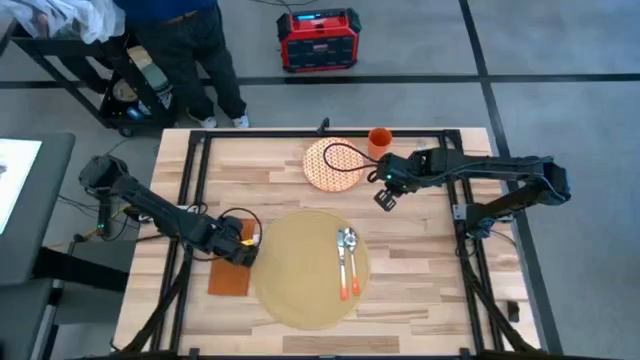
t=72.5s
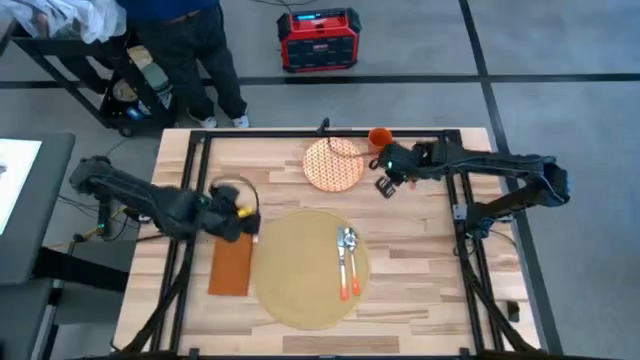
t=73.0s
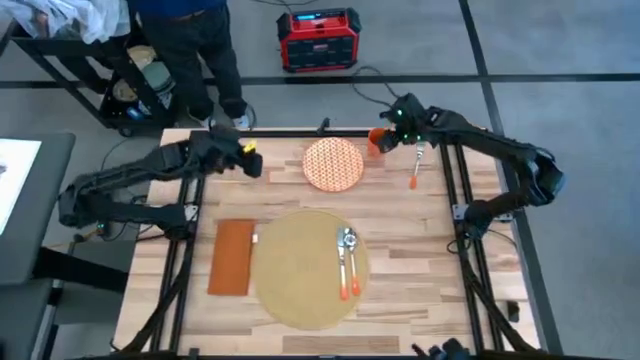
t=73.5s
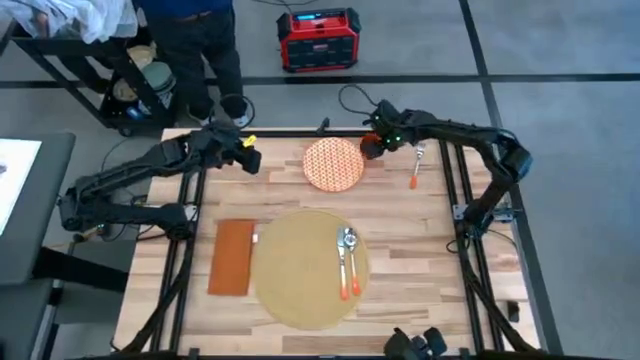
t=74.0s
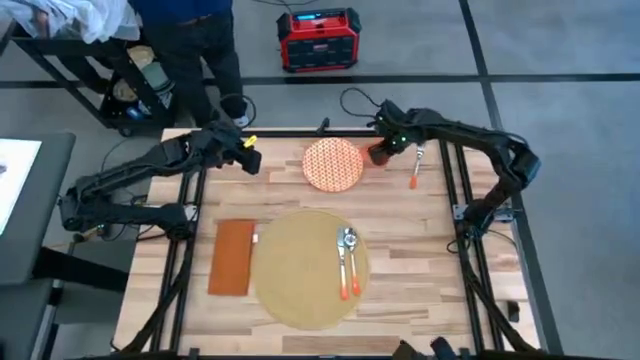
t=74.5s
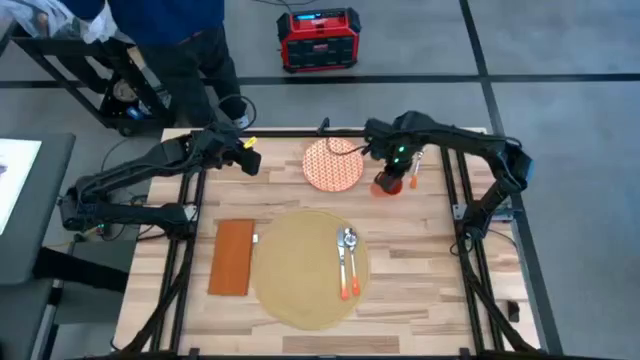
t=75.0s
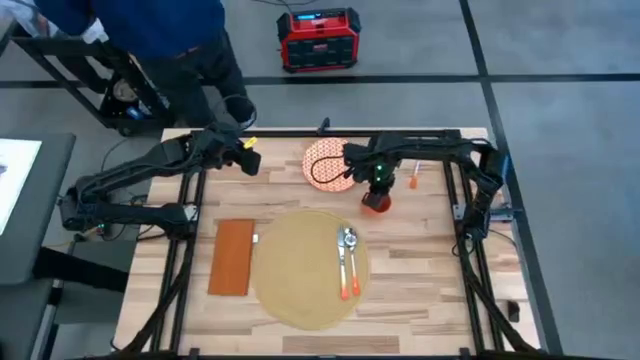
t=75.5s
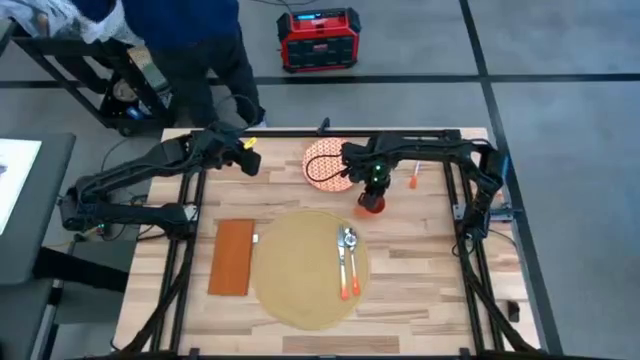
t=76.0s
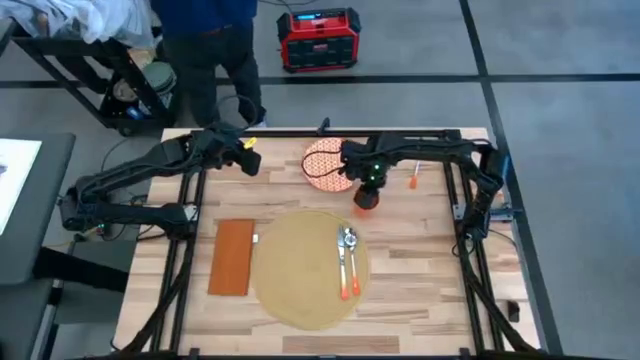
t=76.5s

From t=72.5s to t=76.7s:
Task: Set table place
Move the orange cup to the top of the brown placemat

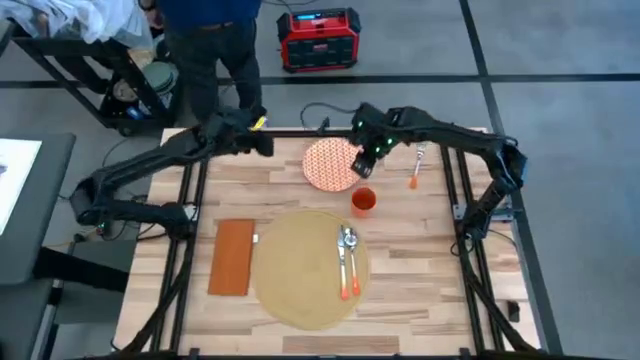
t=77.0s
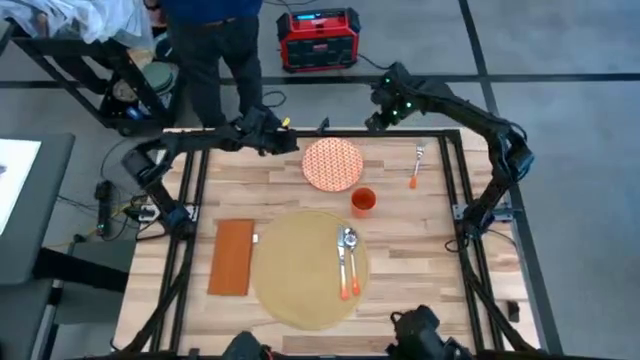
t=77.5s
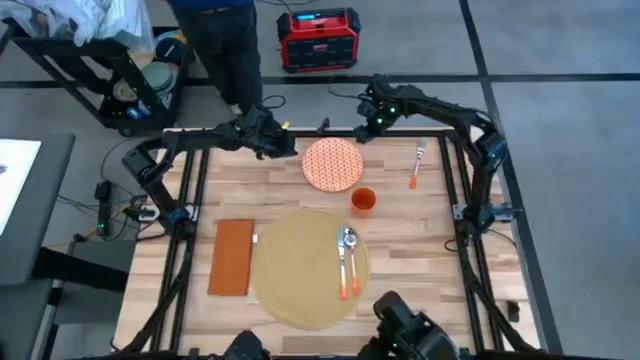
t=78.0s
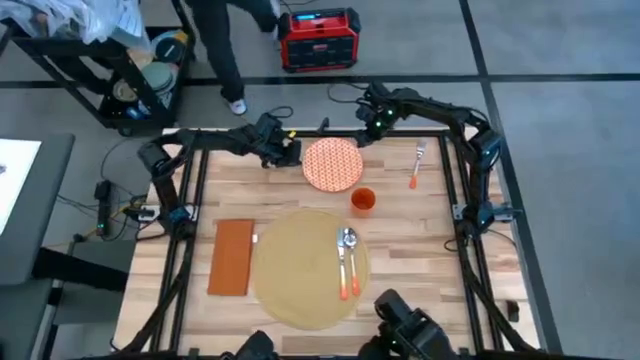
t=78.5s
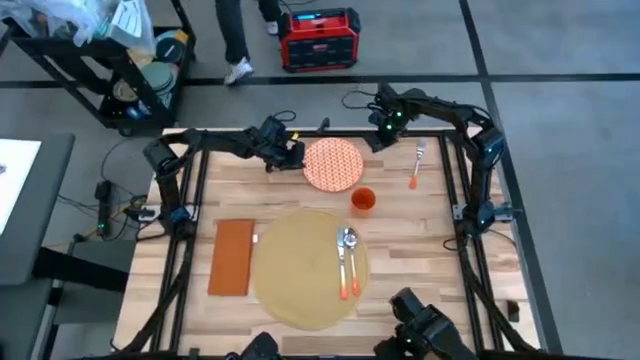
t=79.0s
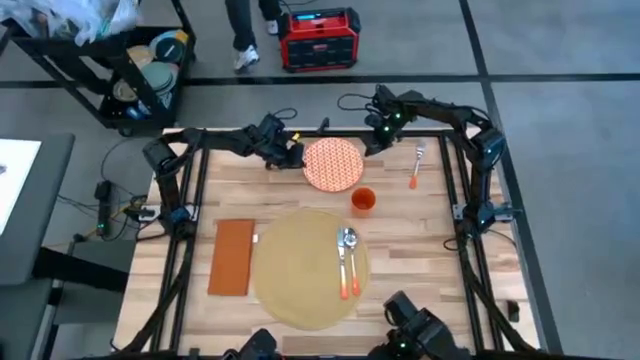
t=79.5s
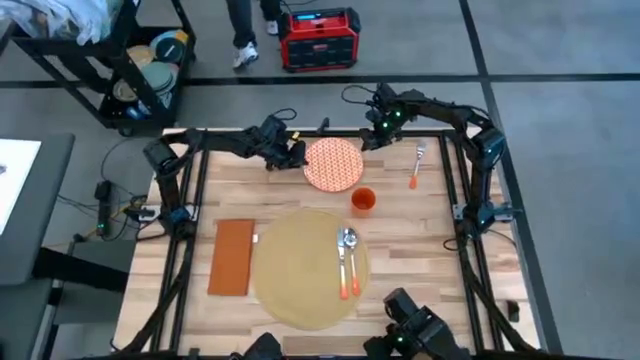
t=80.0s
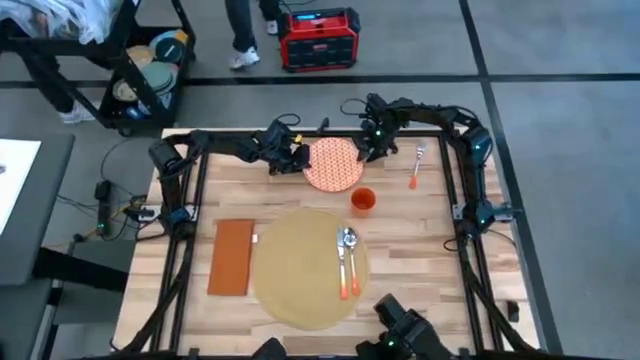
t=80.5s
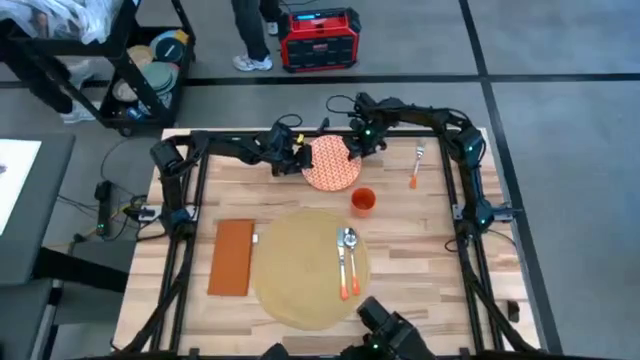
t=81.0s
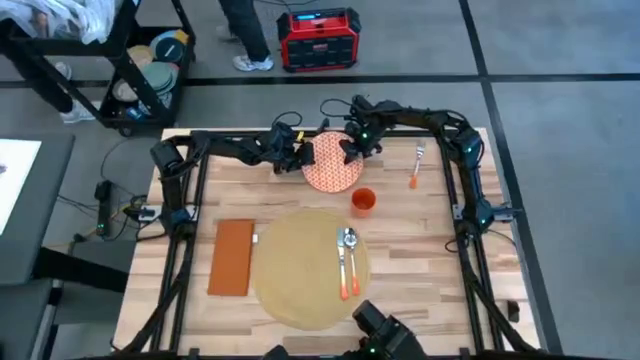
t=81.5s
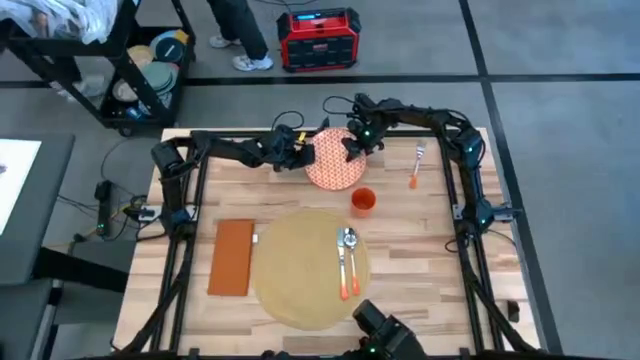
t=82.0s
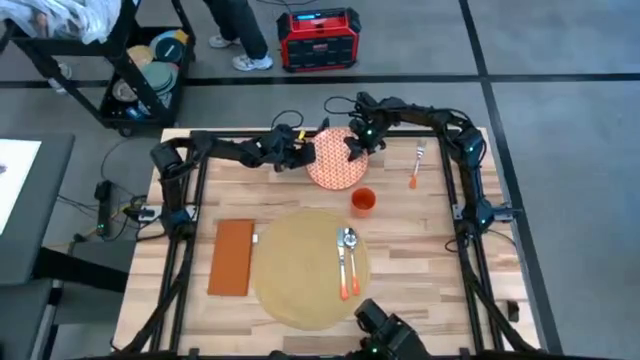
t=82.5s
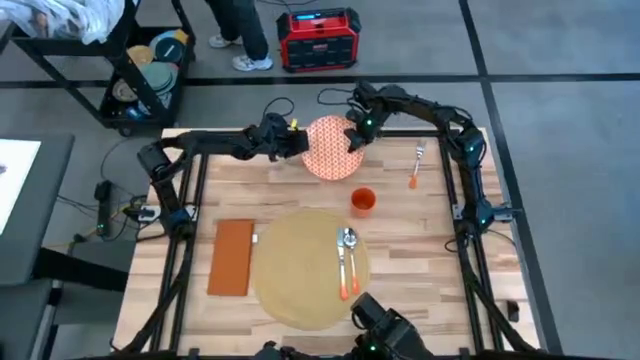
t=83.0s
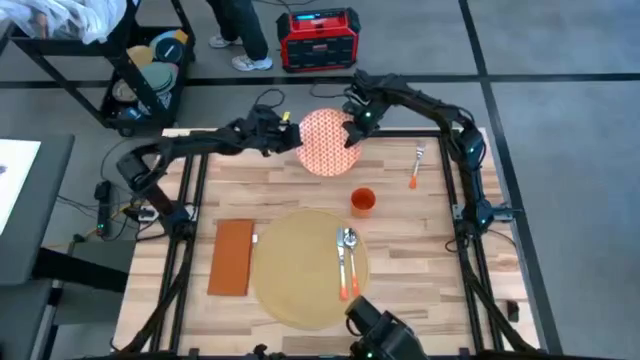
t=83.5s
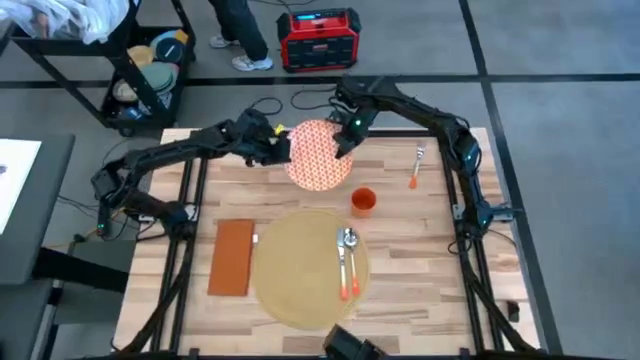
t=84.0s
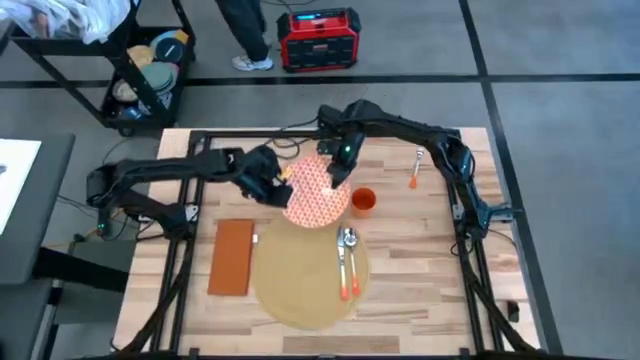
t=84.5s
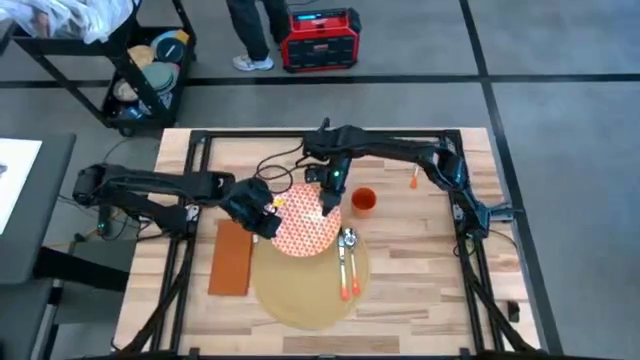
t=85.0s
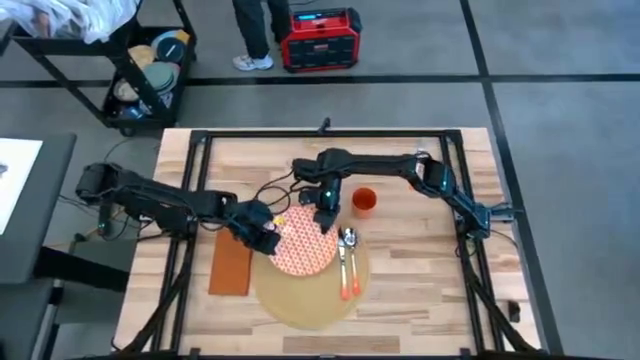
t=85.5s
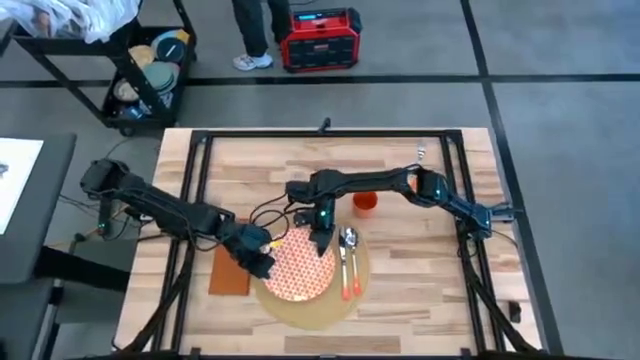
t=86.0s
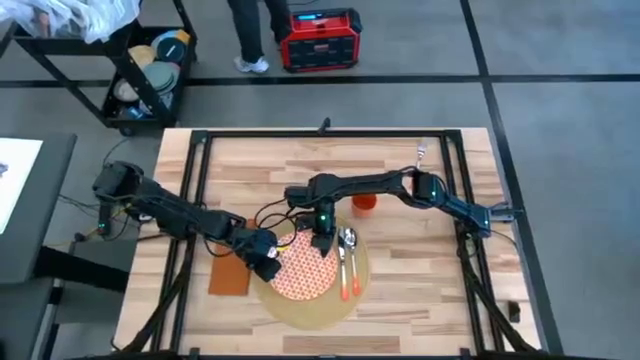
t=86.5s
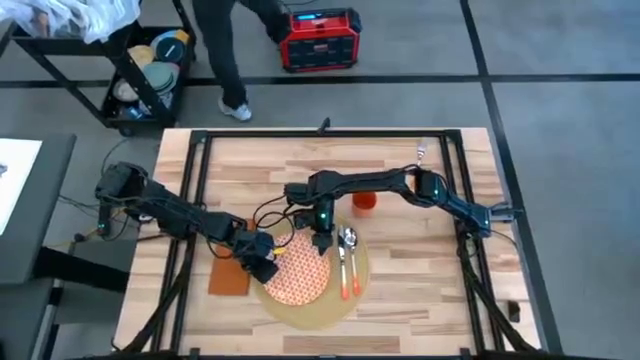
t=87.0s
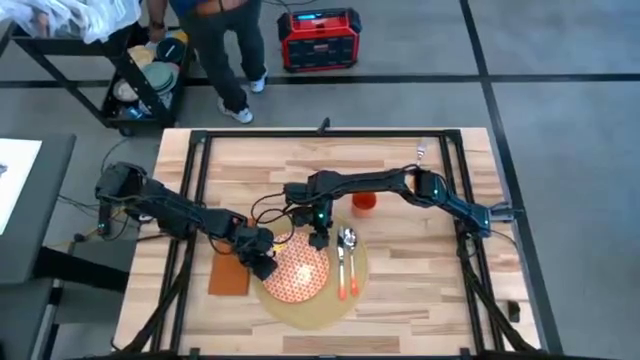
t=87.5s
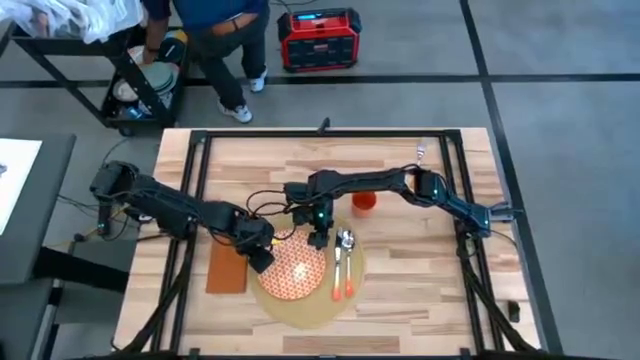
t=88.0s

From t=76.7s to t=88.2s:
Put the orange patterned plate on the brown placemat on the left side of the orange knife

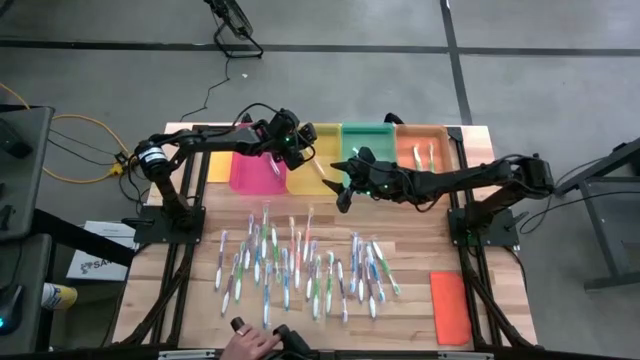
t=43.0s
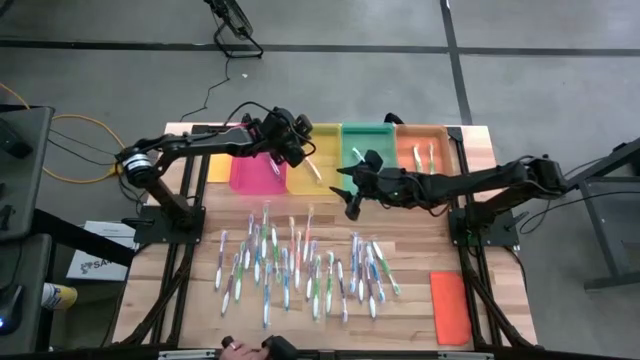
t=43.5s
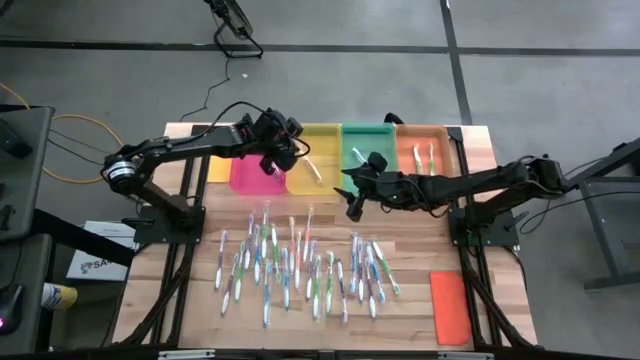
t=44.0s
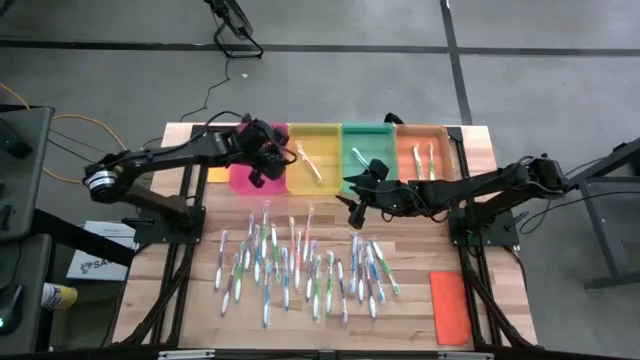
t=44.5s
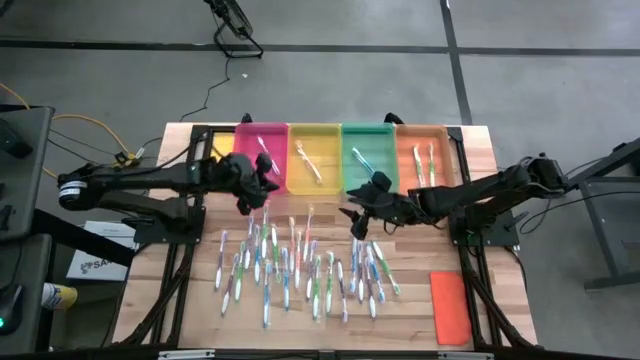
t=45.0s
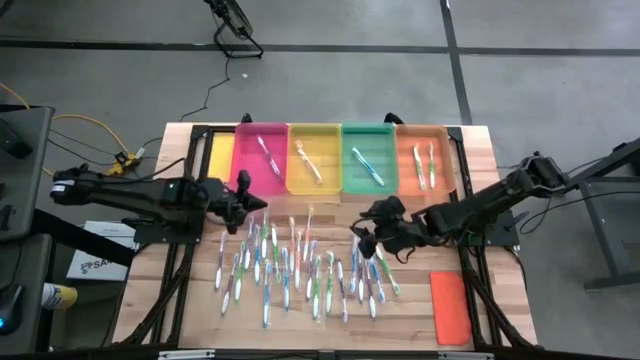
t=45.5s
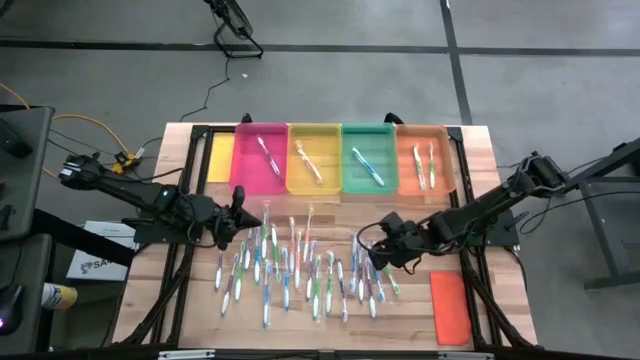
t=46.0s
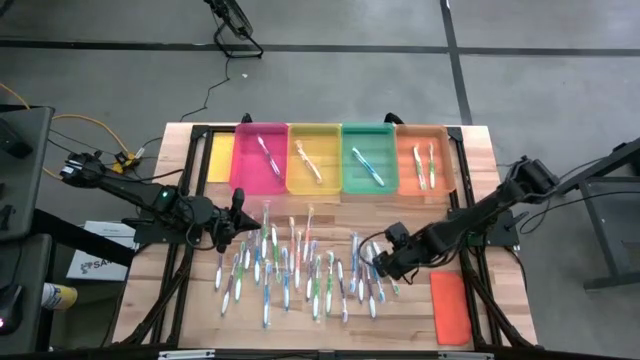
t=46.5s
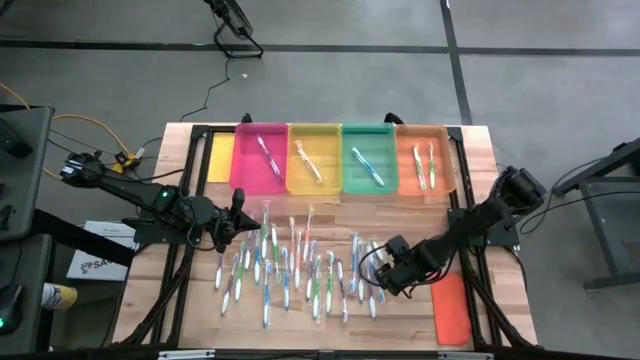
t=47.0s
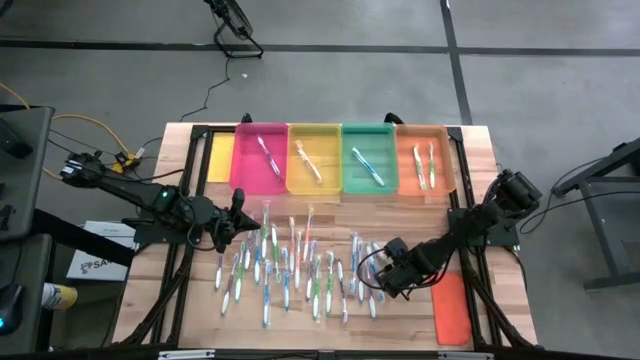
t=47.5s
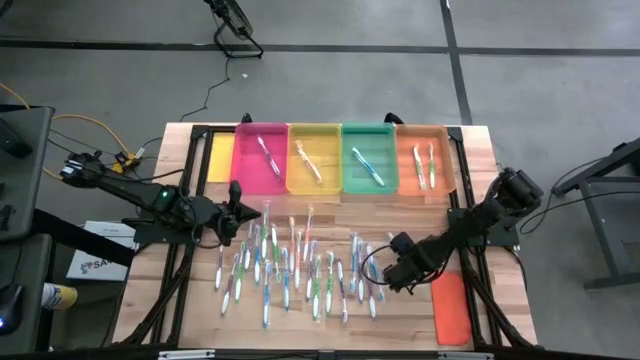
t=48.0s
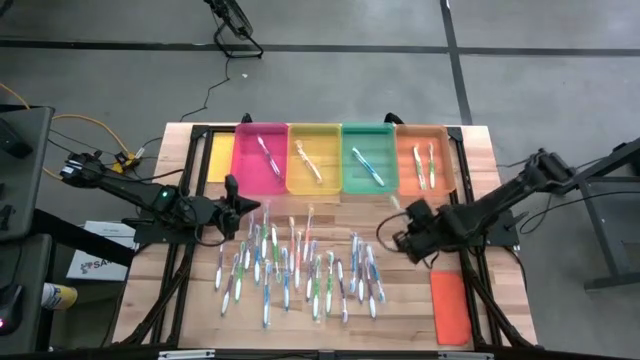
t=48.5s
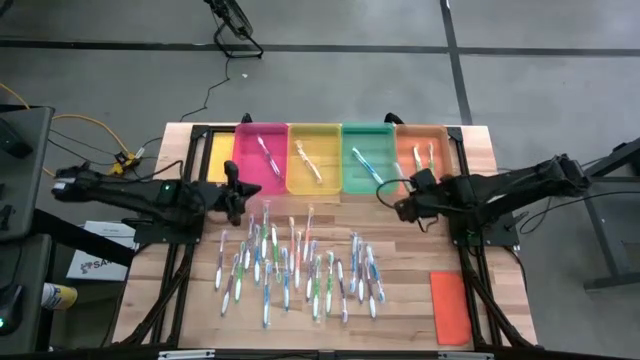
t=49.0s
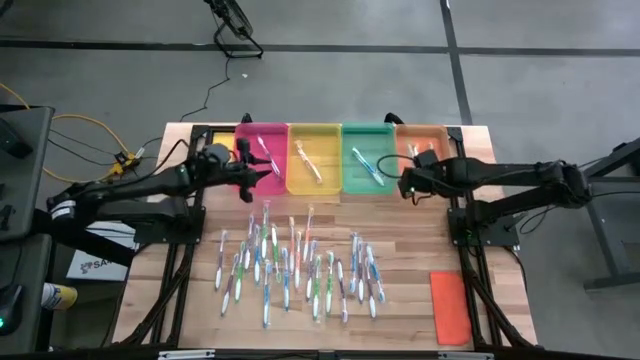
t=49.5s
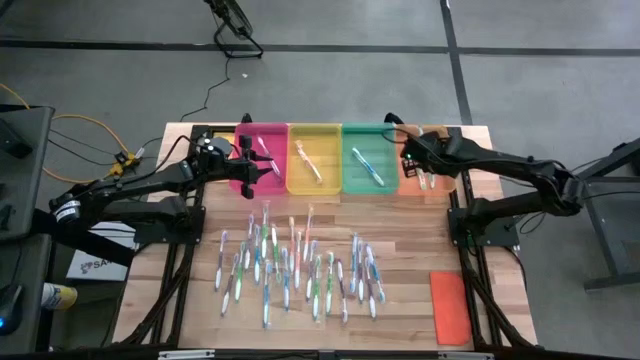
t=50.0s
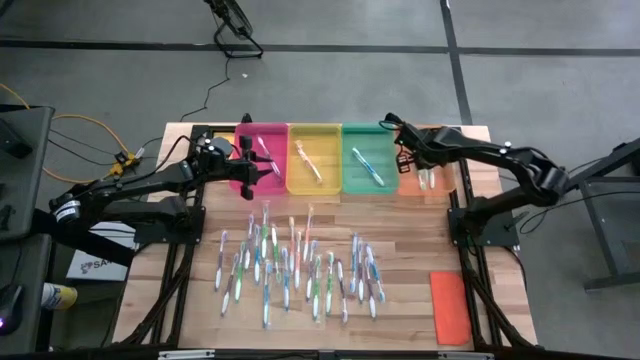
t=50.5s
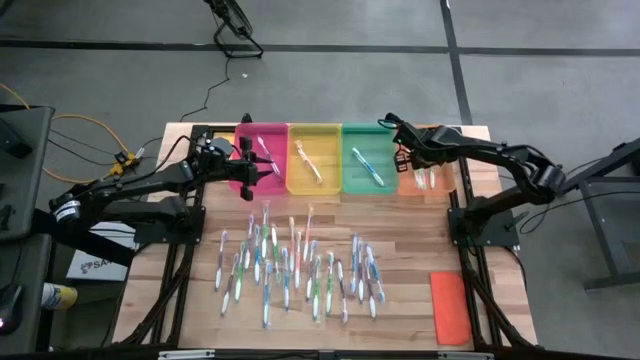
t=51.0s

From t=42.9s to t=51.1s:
Task: Pick & Place Toothbrushes
Put the green toothbrush into the orange bin
